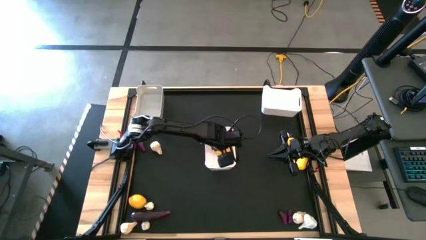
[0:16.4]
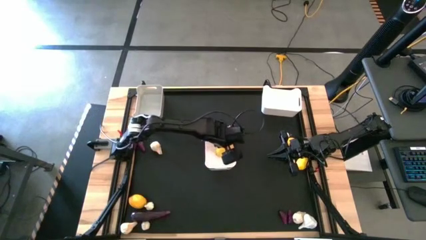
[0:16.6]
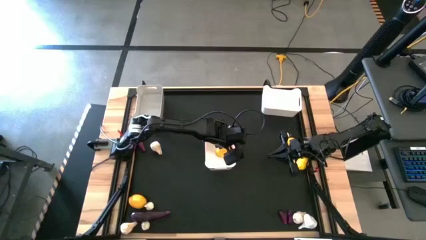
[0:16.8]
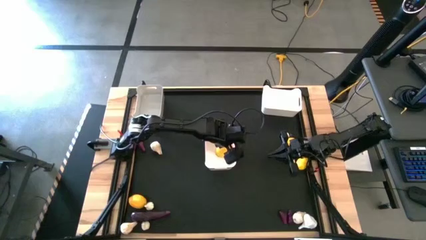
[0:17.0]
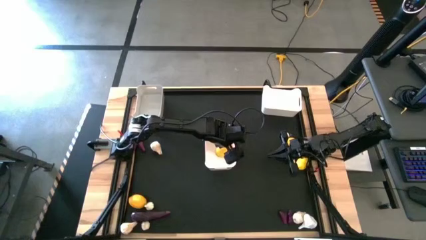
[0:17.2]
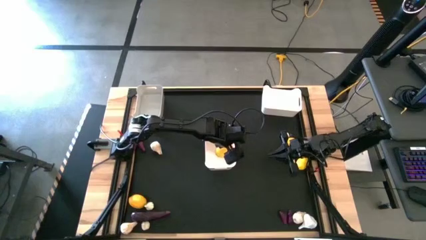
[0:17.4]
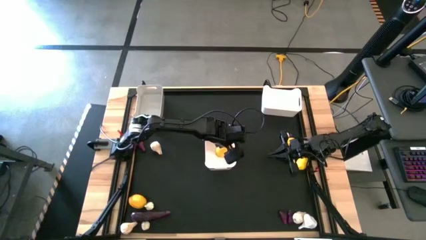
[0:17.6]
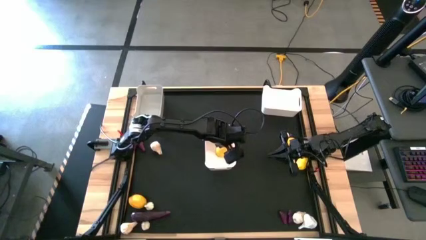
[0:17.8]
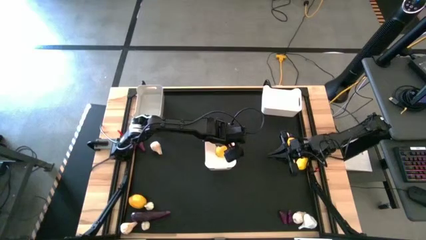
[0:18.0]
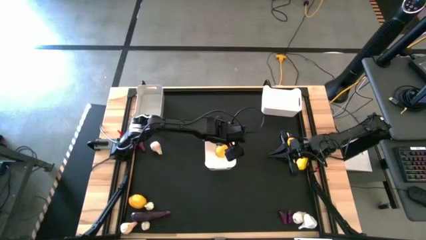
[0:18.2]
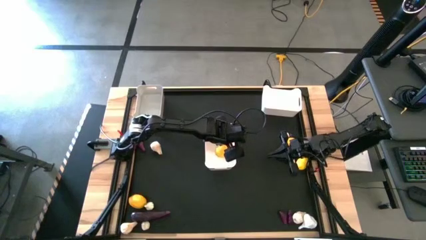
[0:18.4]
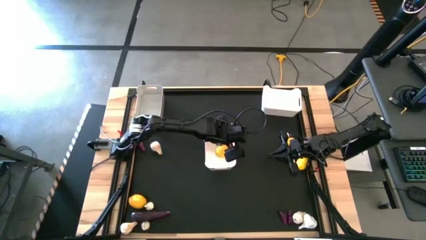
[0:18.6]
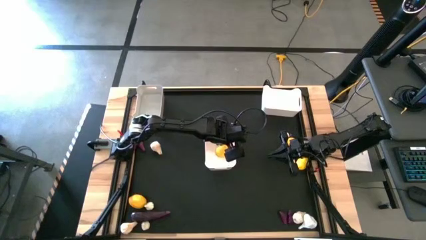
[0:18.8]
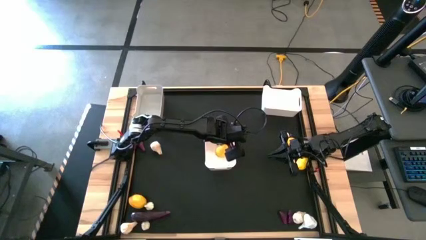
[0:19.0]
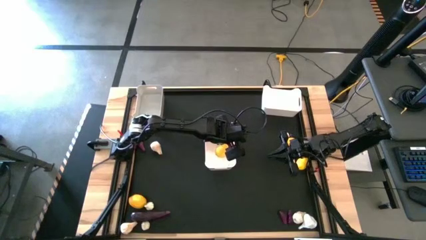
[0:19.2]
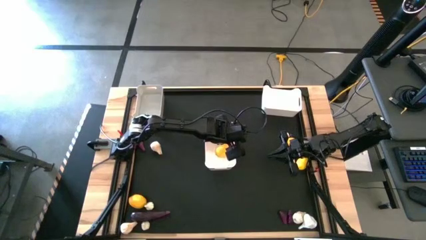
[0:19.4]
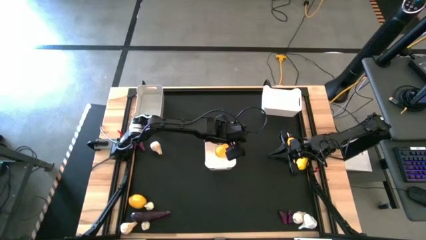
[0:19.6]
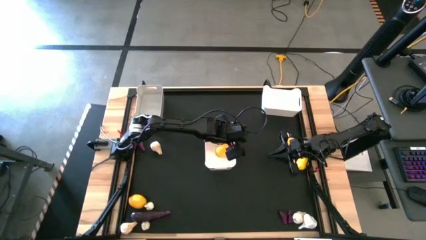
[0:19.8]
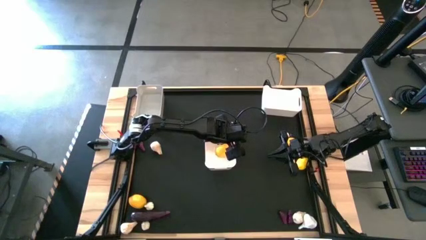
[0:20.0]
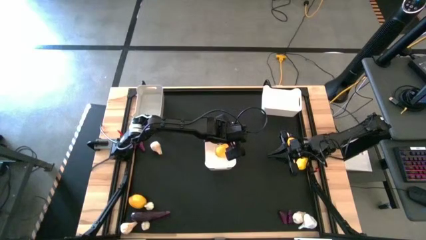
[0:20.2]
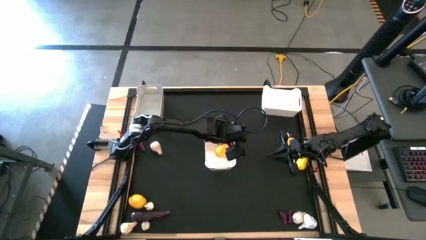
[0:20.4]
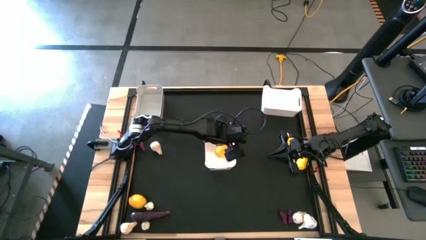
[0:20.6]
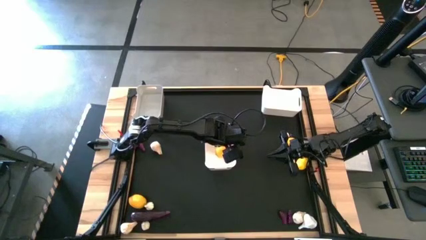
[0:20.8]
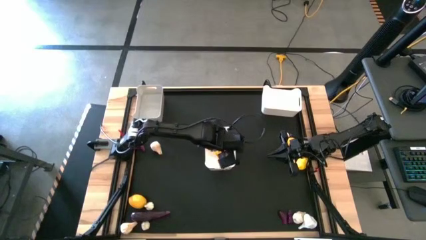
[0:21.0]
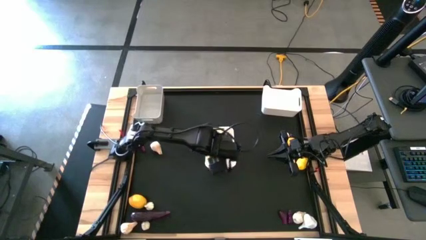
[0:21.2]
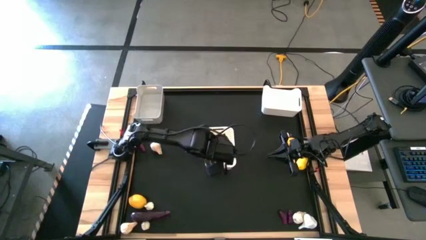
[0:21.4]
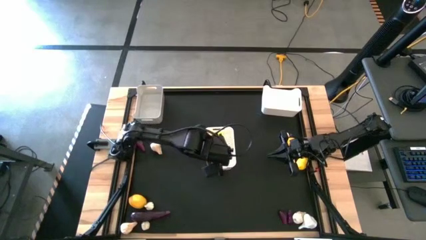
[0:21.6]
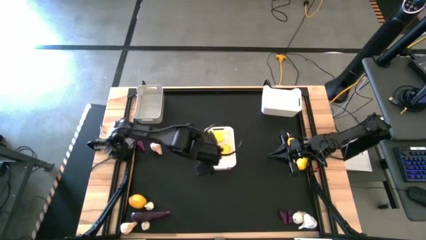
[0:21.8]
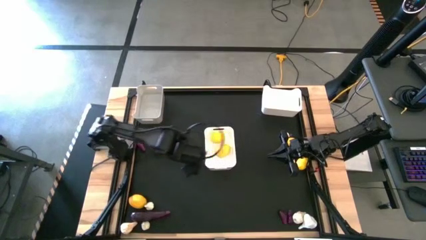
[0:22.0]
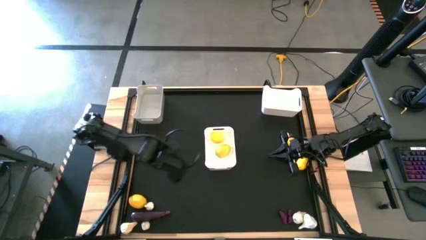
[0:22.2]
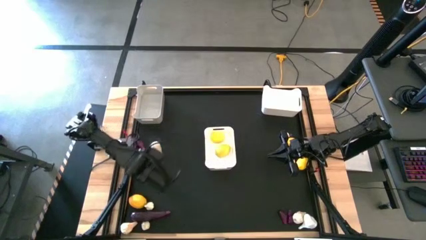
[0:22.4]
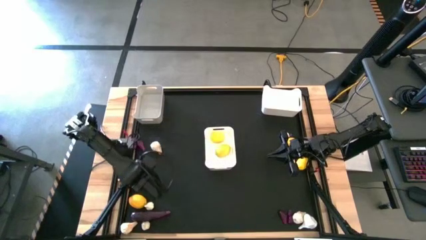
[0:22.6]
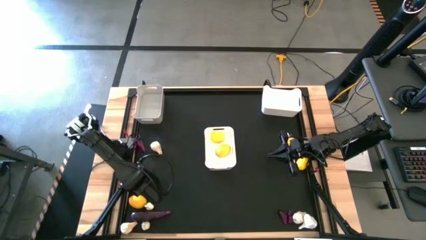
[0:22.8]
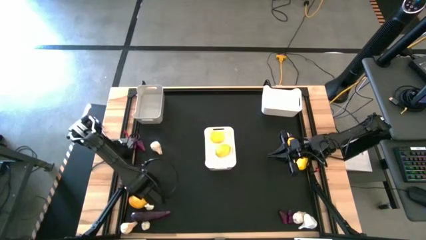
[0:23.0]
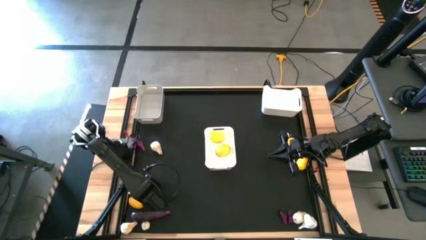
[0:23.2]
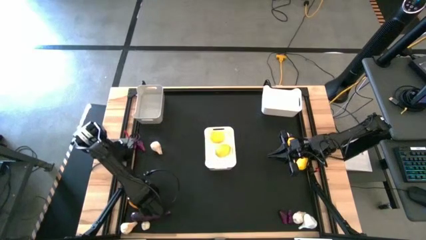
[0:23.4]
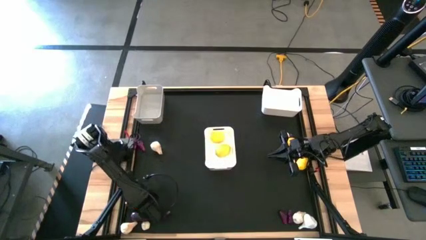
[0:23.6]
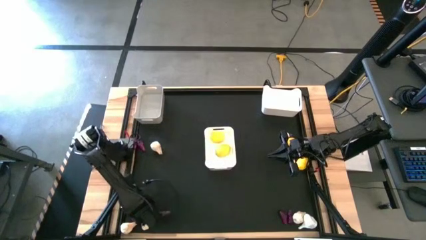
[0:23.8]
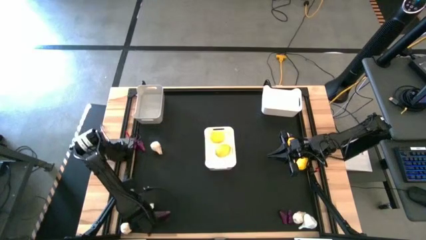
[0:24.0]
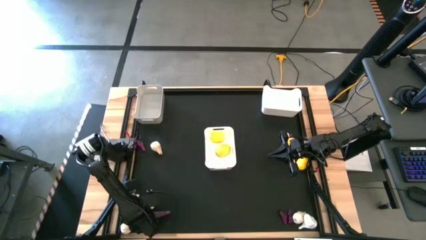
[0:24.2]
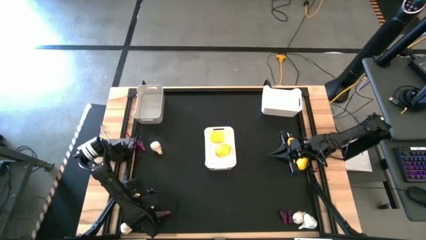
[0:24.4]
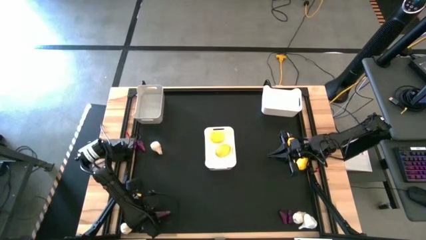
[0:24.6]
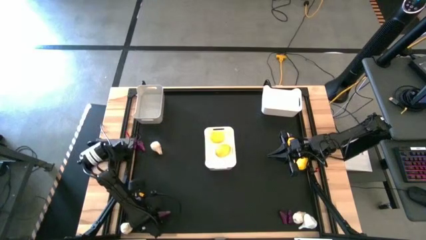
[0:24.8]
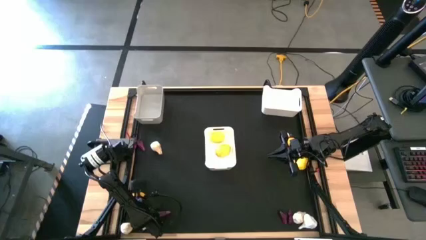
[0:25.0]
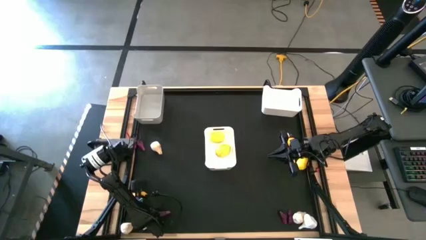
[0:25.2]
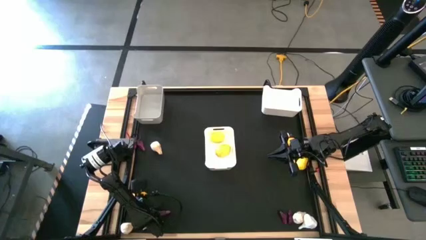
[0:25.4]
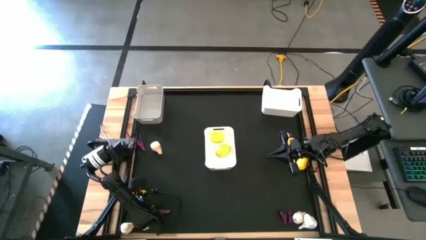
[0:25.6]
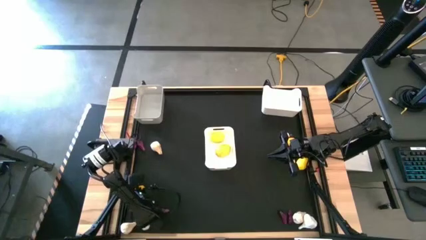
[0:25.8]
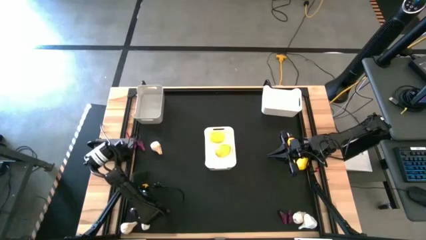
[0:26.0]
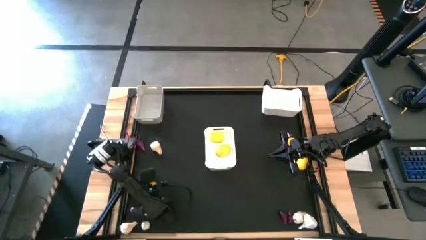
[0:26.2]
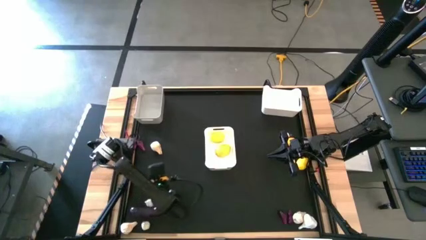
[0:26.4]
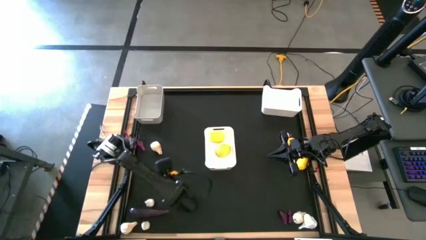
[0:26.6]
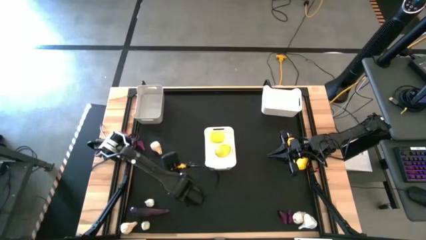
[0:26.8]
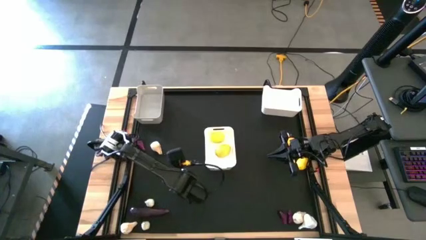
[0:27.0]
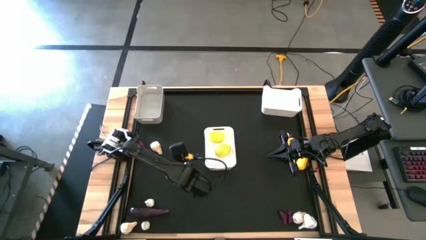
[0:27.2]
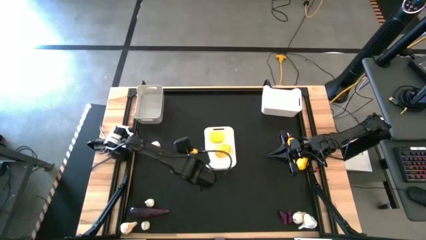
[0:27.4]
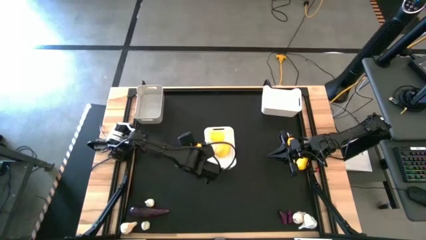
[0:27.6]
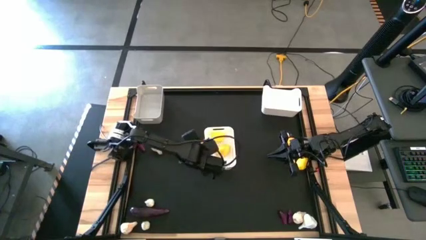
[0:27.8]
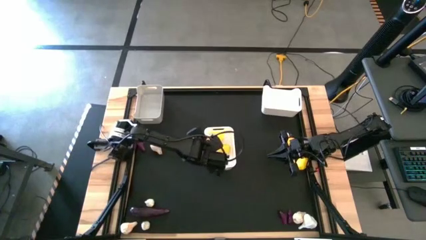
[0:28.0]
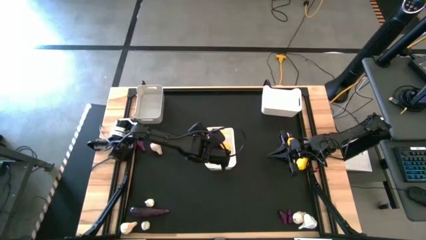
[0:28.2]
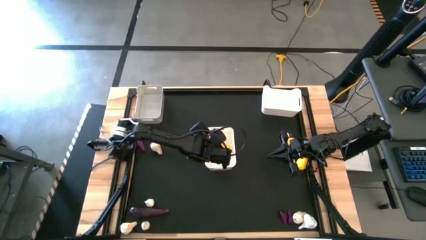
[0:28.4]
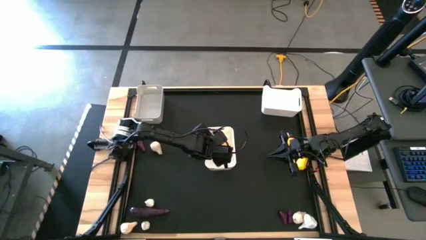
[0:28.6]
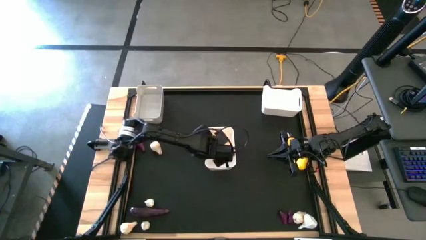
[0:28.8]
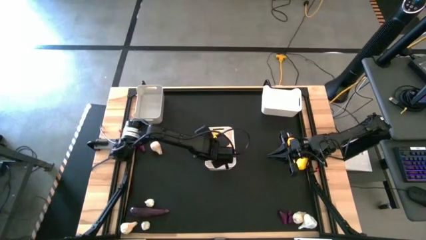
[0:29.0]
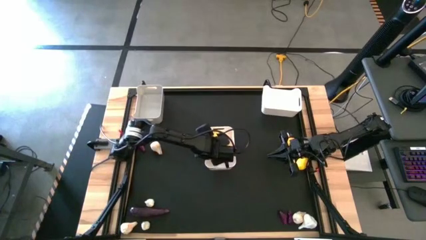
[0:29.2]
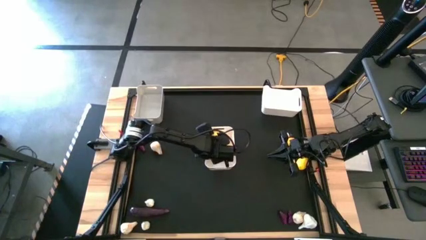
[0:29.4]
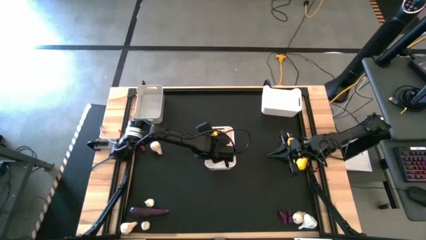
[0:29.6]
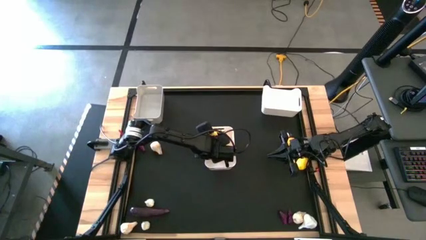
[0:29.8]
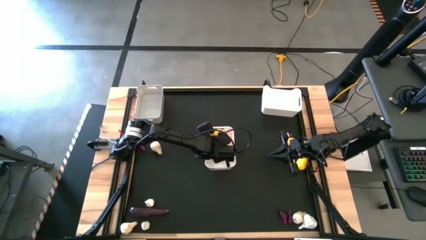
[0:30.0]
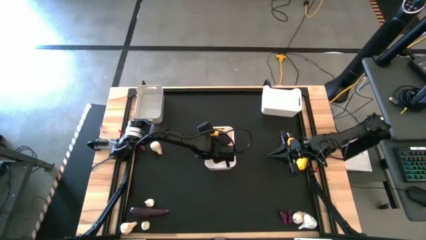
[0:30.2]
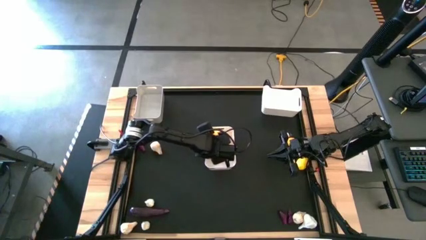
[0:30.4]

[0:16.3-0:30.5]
Task: Sort produce into baskets
Put the lemon into the bottom white bin
